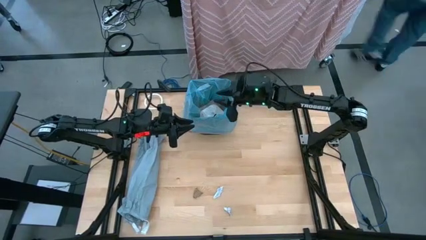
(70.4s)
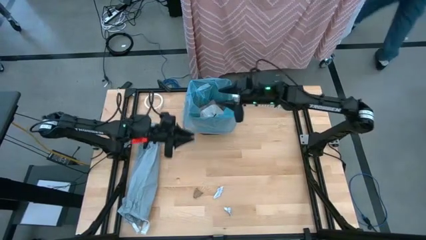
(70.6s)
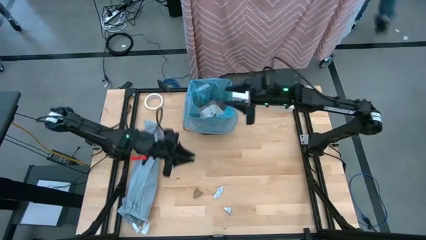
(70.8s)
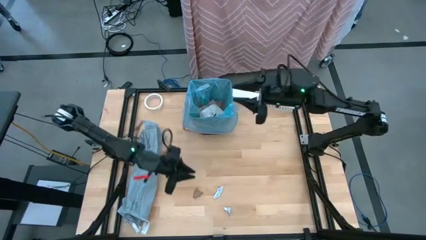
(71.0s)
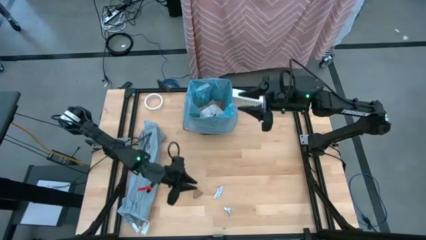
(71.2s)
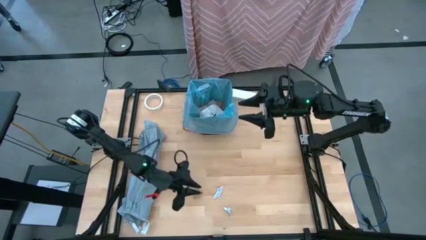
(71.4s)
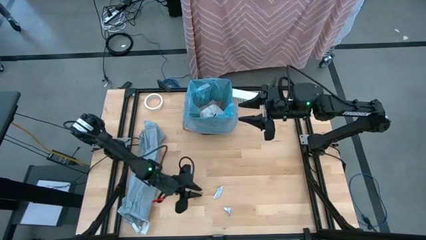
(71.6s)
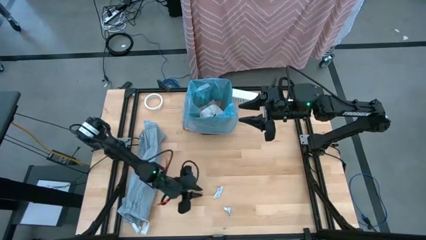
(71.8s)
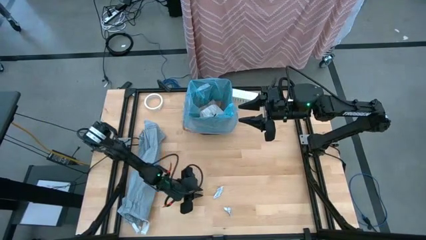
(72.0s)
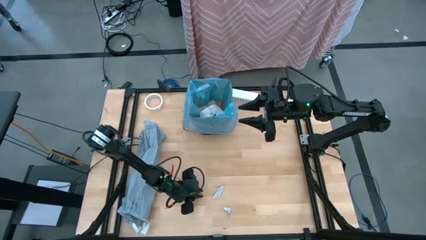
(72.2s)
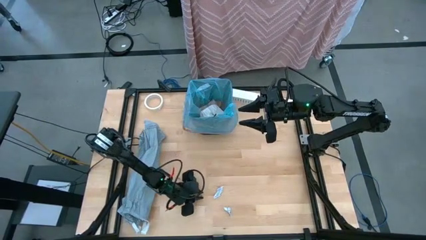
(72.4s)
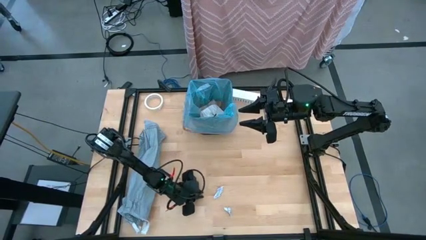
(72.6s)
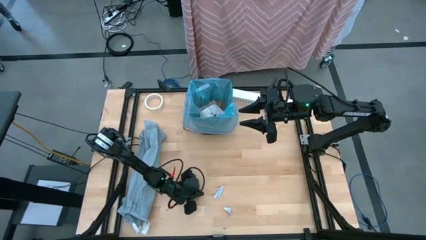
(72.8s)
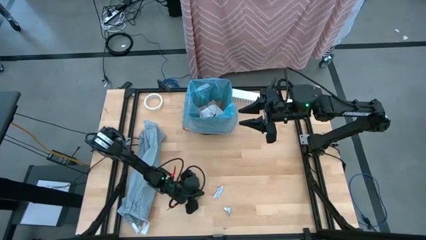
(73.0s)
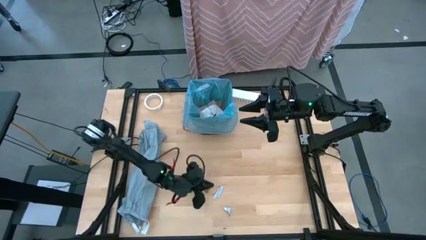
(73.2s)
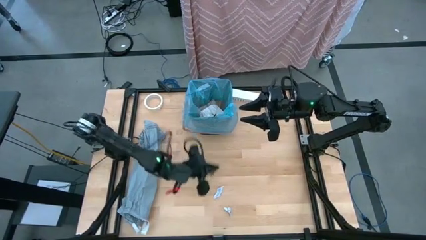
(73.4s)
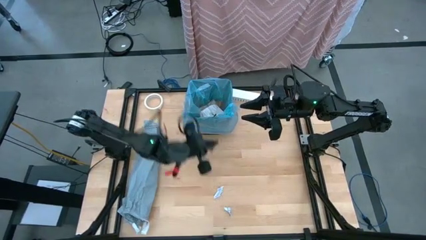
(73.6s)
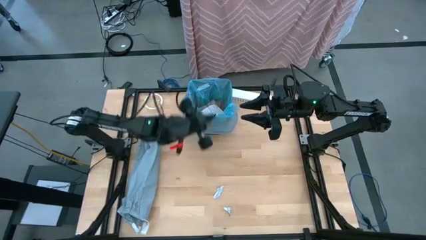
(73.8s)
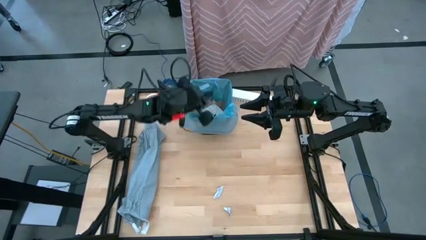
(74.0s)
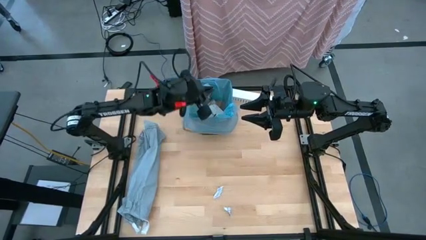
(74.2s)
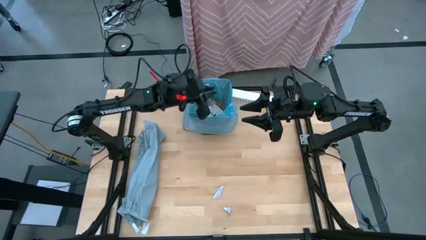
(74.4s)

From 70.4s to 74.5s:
Task: place trash/remove bag and relplace
Put the brown napkin into the trash bin

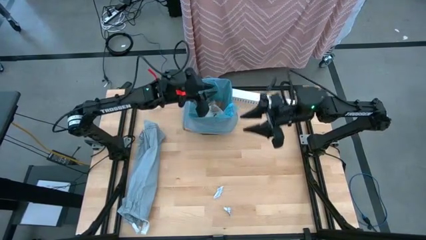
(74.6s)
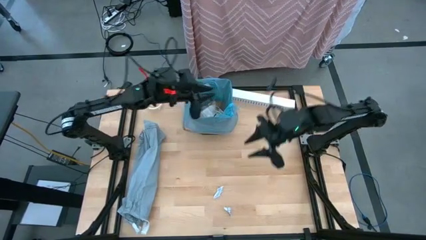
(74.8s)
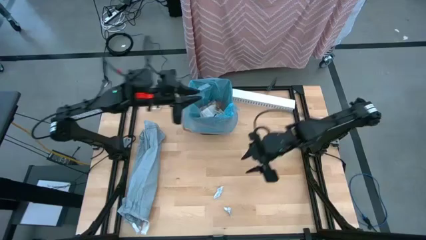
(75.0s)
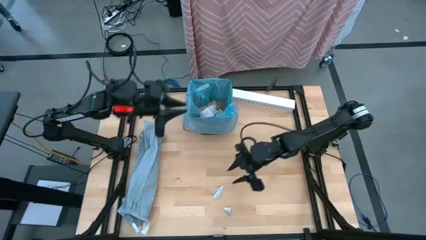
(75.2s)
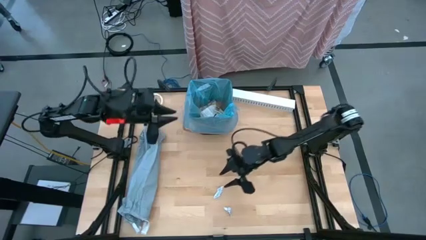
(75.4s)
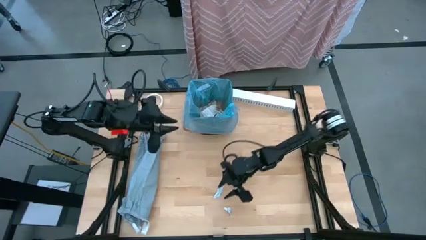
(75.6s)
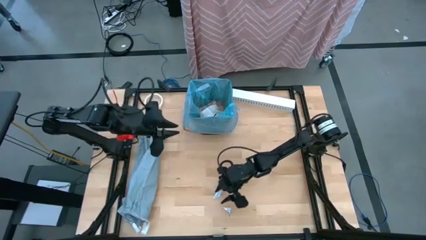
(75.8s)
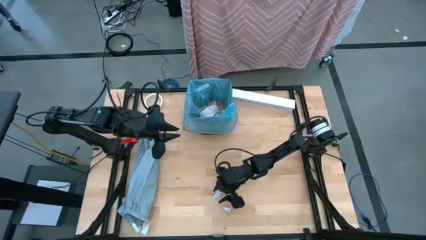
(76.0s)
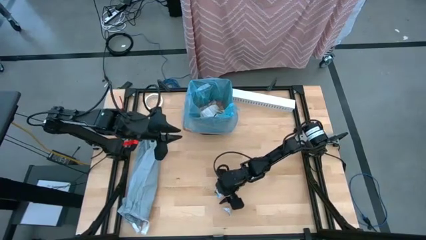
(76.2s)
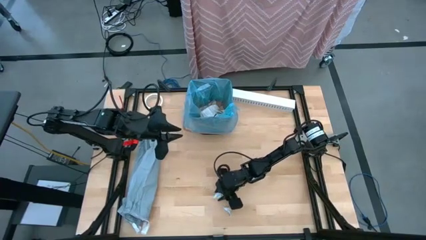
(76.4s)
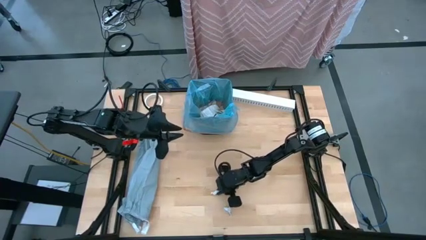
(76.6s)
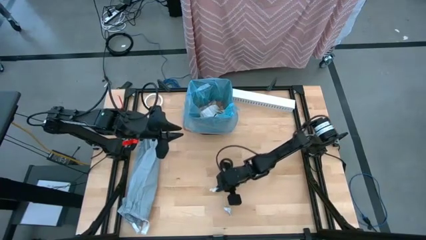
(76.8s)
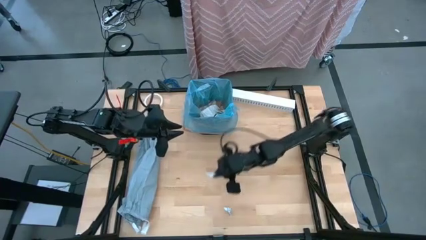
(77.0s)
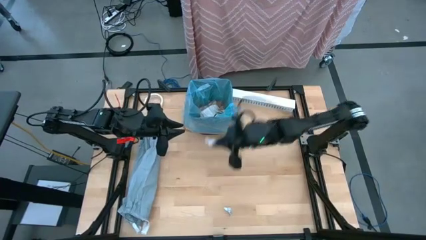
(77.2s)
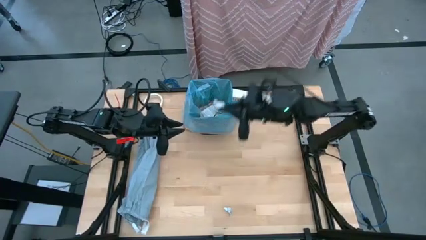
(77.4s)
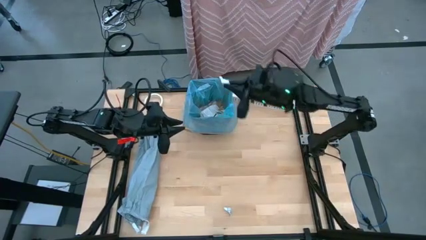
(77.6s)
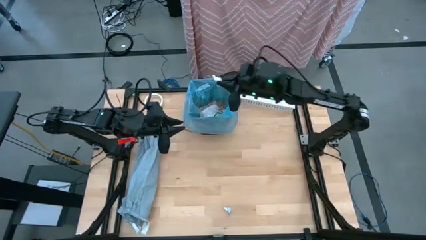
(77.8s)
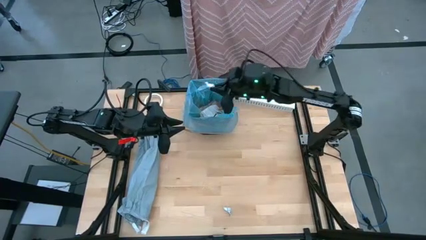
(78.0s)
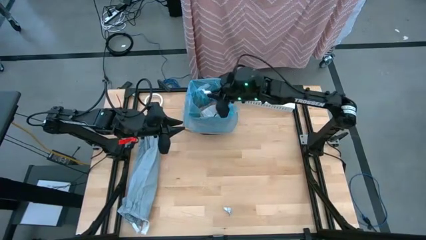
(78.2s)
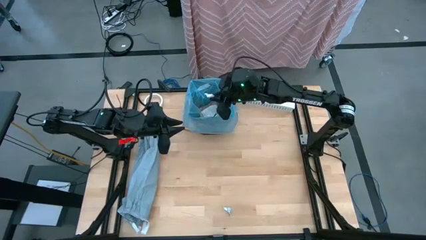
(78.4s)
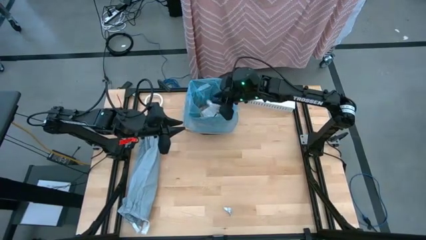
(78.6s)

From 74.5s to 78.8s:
Put the white paper into the trash bin

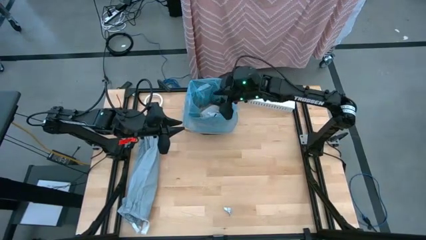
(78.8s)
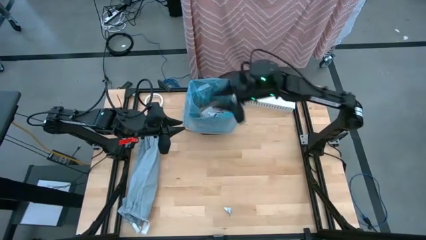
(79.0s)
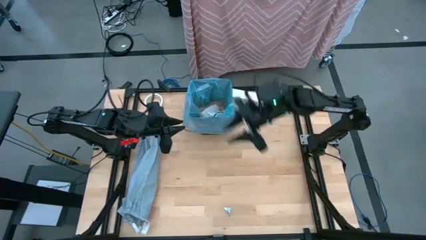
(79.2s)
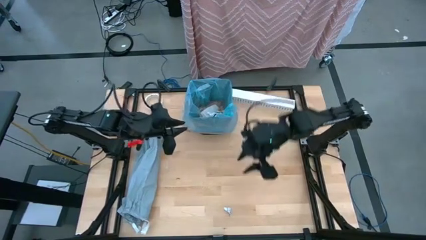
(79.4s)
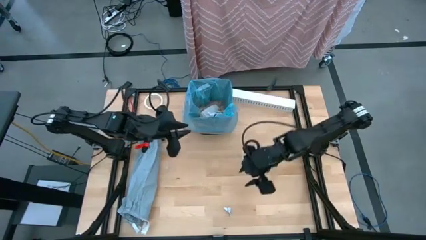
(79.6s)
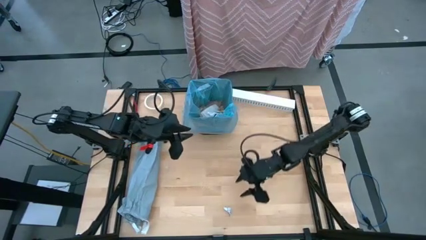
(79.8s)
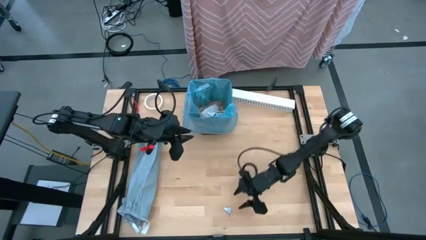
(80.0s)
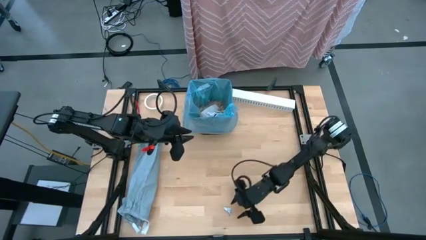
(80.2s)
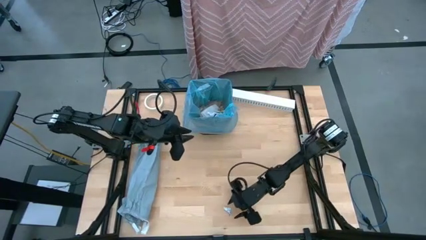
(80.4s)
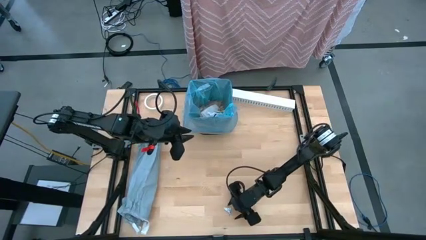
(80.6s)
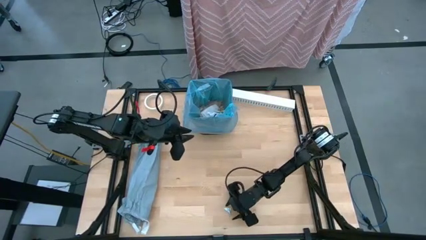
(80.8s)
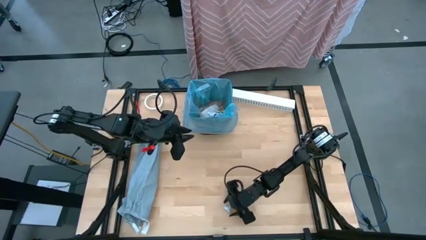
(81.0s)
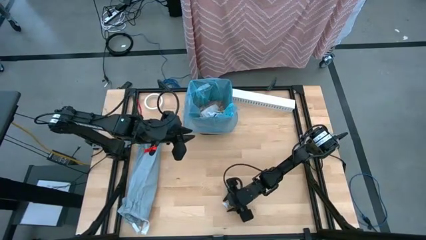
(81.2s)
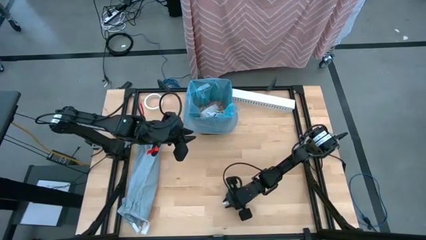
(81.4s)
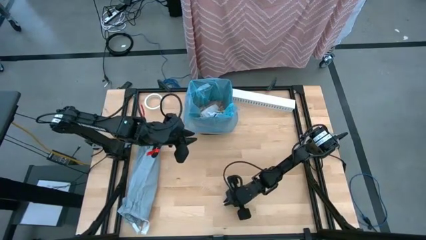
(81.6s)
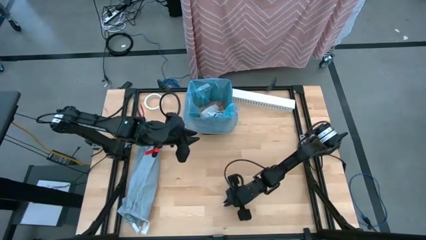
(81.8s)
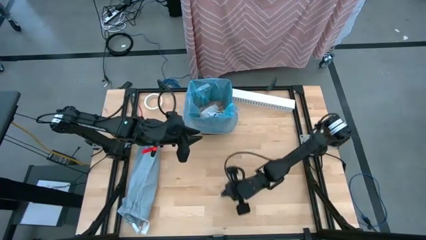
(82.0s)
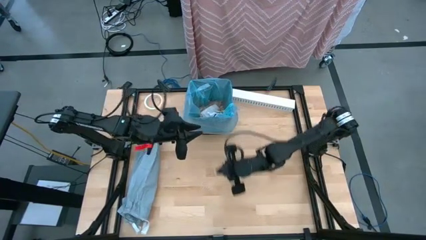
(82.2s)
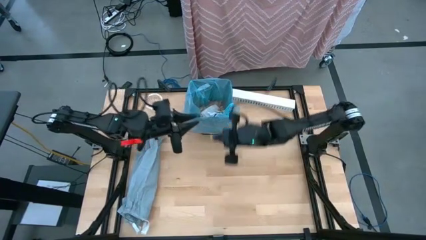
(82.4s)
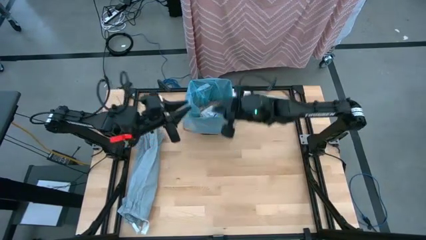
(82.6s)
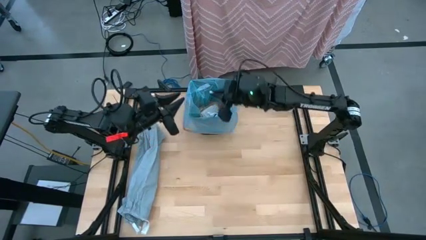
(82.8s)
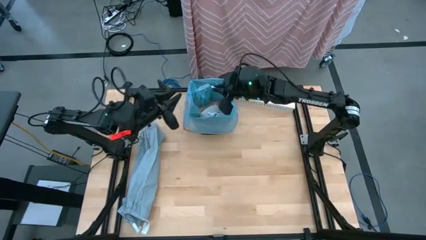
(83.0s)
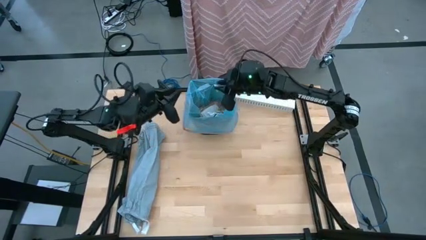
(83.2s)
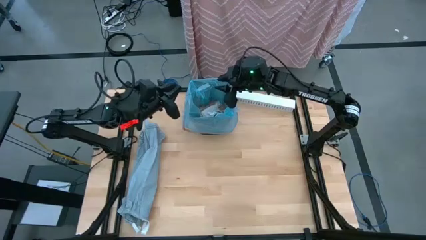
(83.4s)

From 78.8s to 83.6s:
Put the white paper into the trash bin

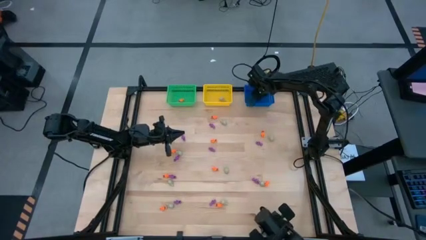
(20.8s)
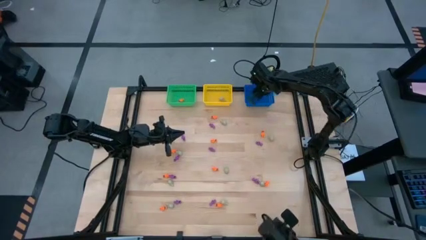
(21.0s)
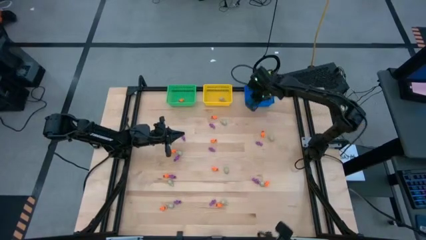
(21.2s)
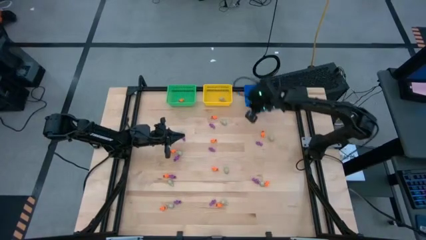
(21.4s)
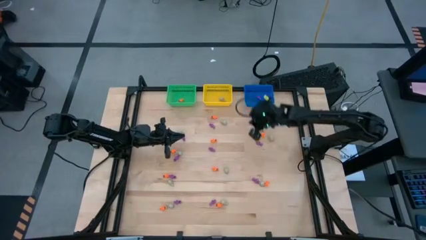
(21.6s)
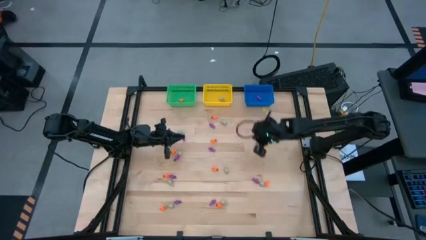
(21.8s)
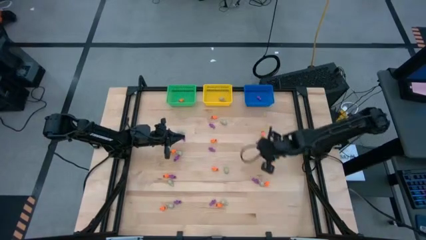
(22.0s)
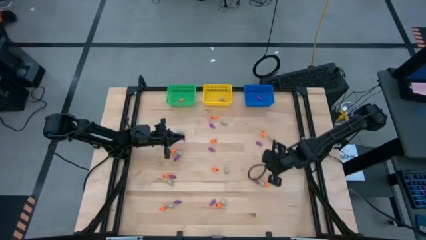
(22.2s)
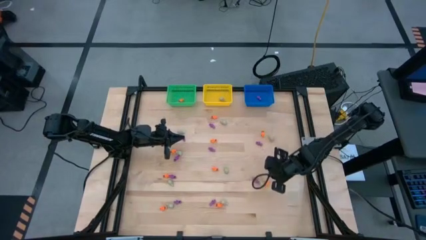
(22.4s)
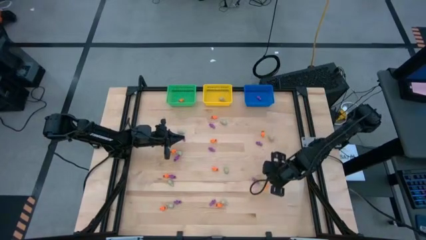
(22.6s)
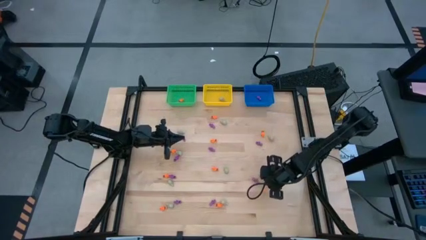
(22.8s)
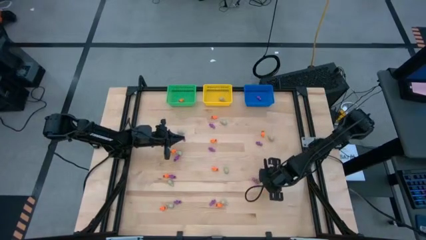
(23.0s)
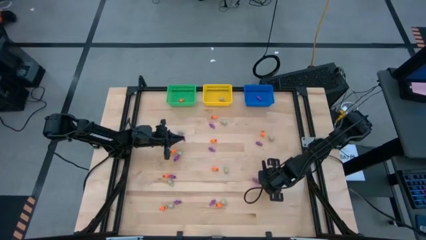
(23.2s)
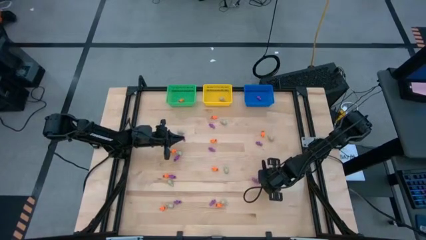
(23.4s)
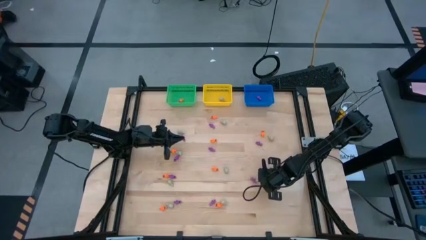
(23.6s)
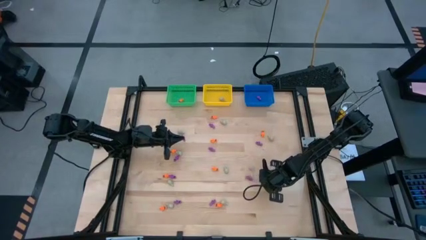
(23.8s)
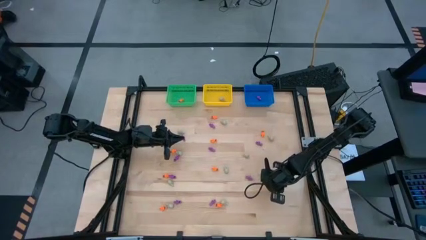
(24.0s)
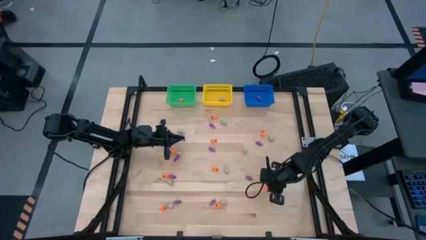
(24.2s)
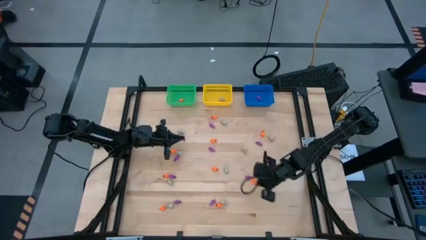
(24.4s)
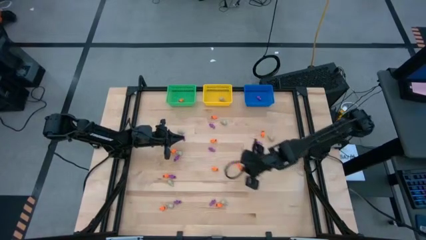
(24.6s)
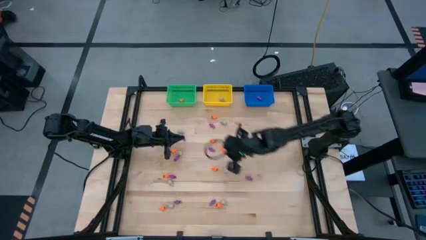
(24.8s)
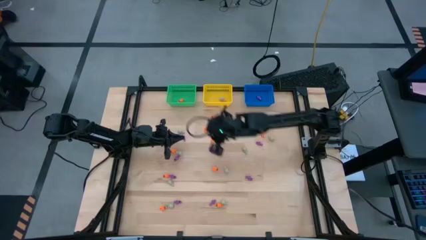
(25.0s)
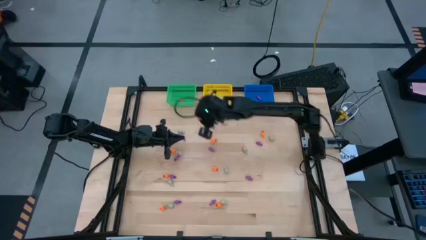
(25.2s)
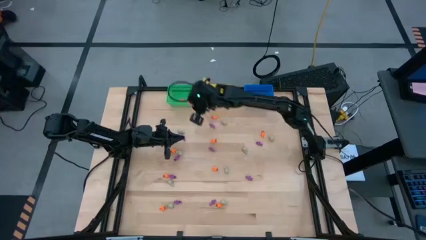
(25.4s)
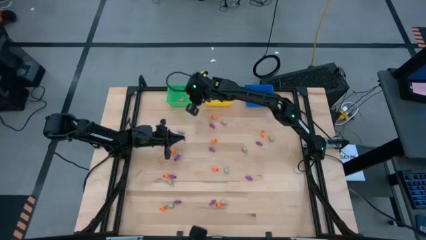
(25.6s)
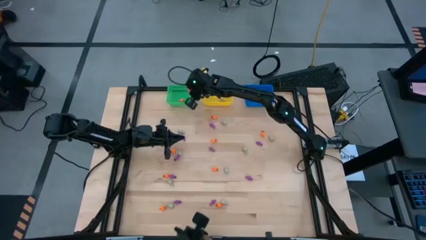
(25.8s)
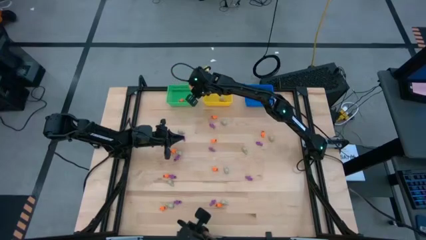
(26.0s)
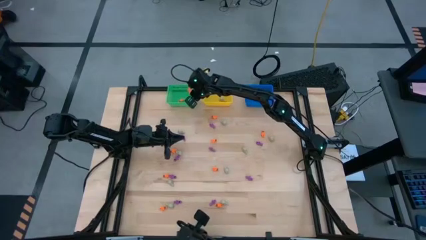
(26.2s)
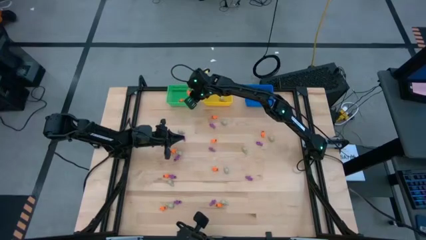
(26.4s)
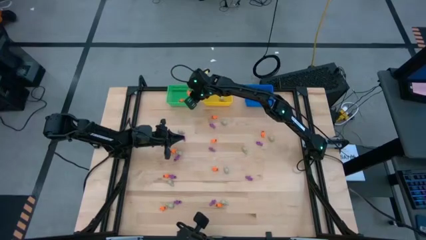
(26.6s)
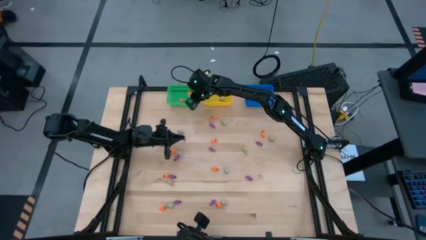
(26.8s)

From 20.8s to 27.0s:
Task: Sort Halloween decoration
Put the orange skeleton toy into the green bin
